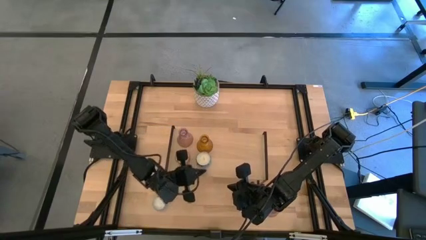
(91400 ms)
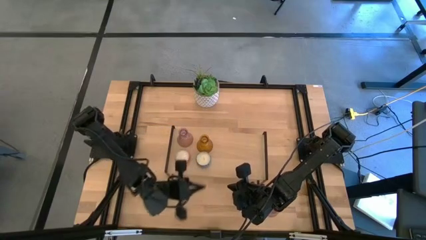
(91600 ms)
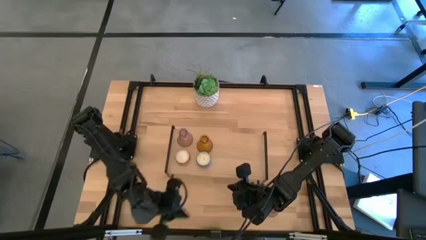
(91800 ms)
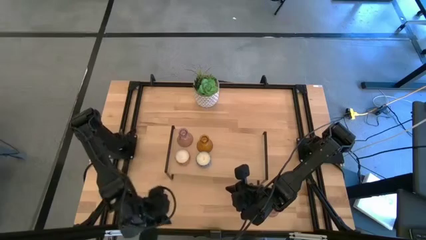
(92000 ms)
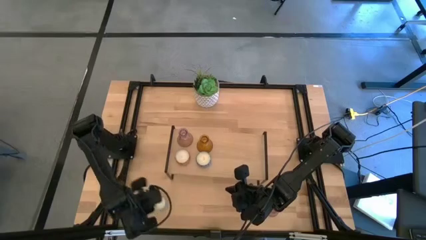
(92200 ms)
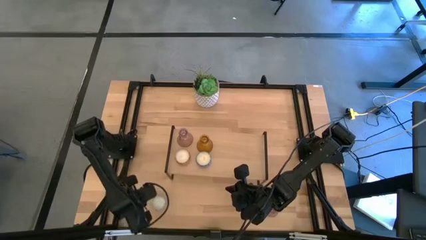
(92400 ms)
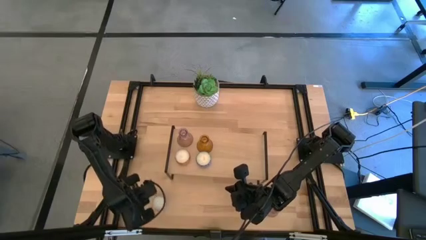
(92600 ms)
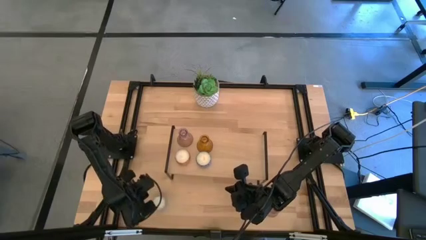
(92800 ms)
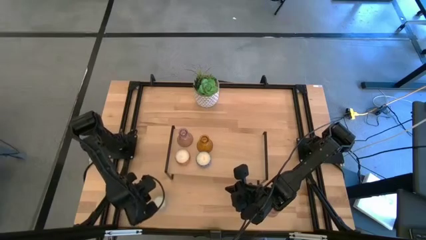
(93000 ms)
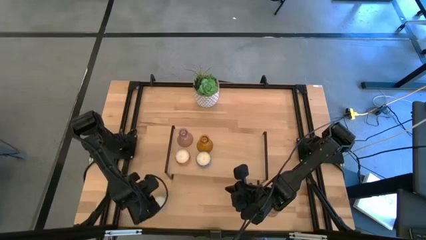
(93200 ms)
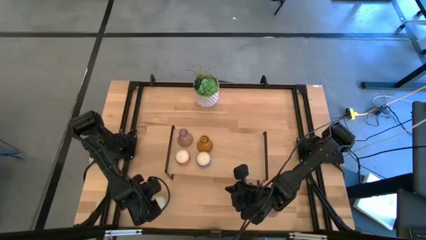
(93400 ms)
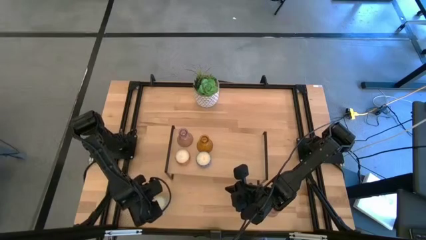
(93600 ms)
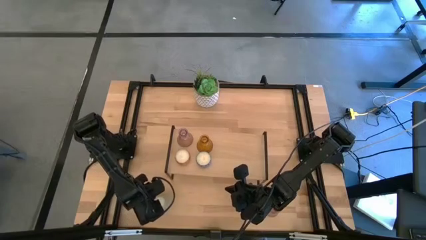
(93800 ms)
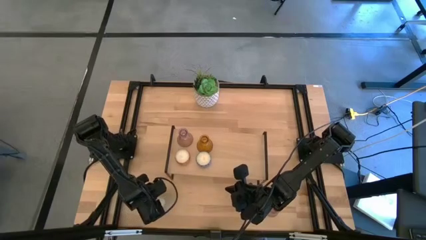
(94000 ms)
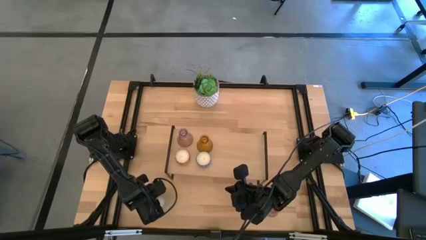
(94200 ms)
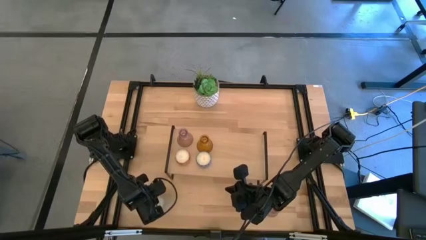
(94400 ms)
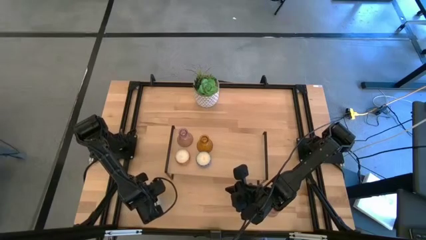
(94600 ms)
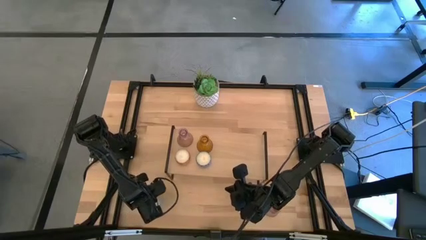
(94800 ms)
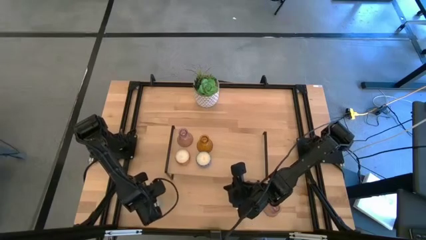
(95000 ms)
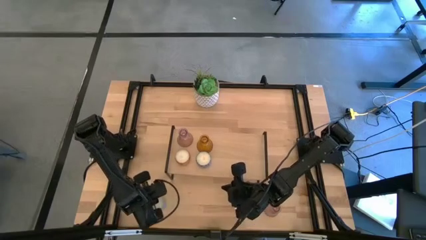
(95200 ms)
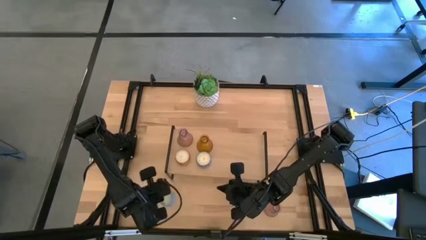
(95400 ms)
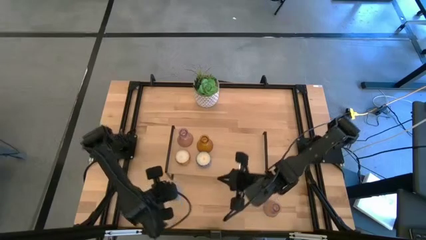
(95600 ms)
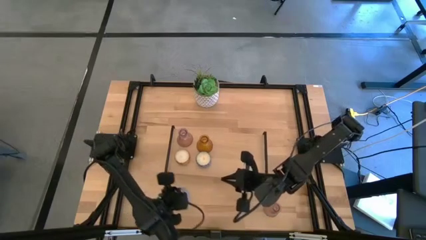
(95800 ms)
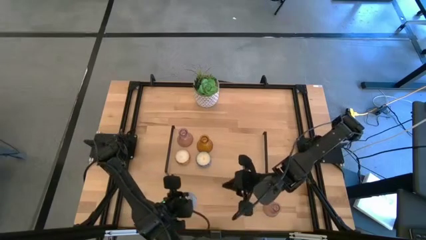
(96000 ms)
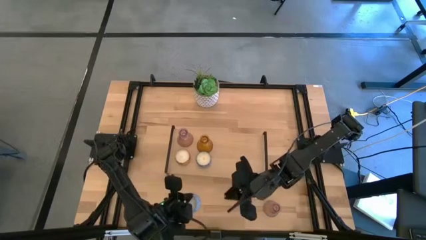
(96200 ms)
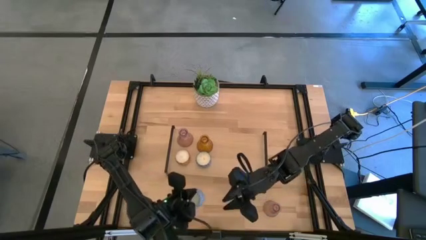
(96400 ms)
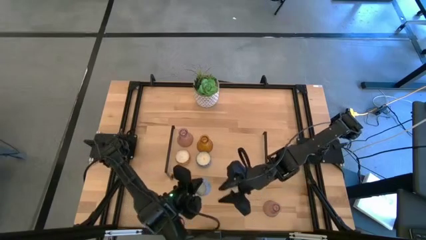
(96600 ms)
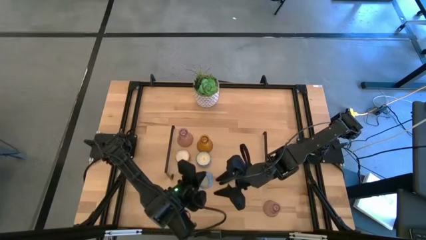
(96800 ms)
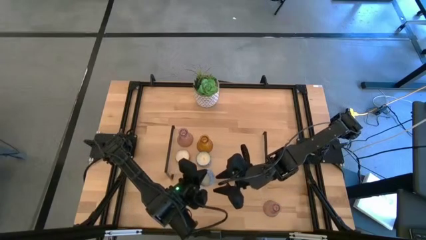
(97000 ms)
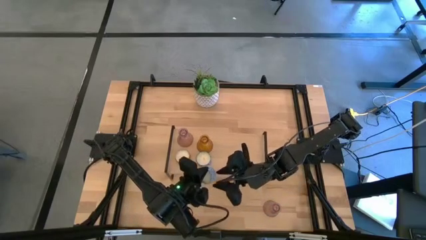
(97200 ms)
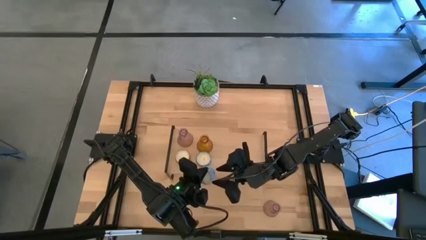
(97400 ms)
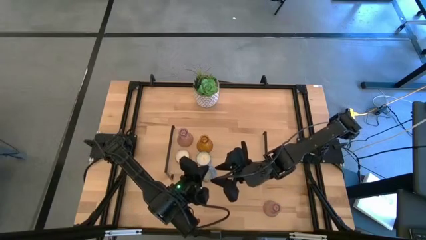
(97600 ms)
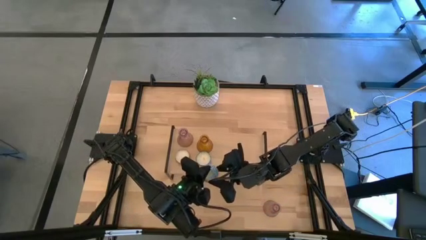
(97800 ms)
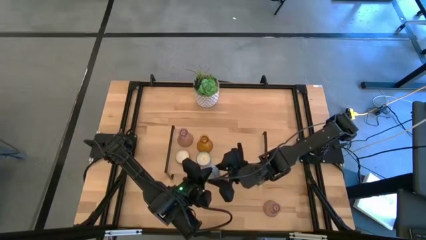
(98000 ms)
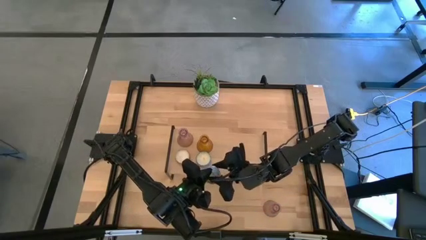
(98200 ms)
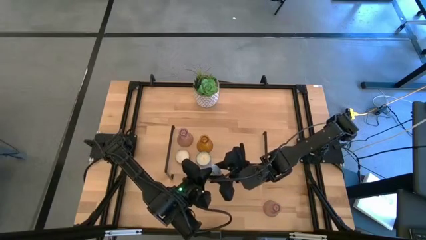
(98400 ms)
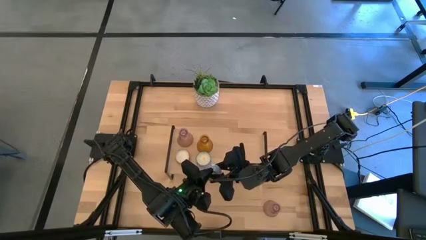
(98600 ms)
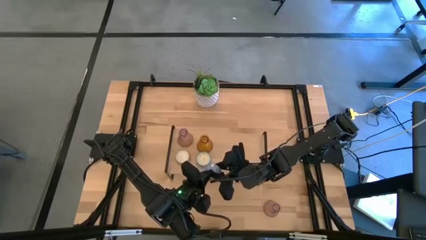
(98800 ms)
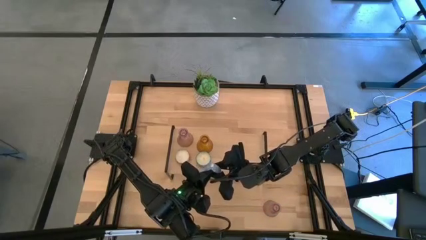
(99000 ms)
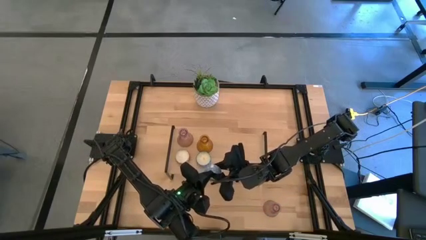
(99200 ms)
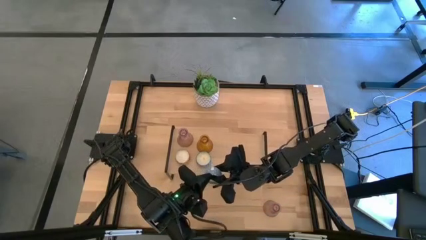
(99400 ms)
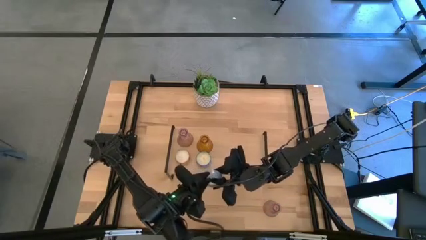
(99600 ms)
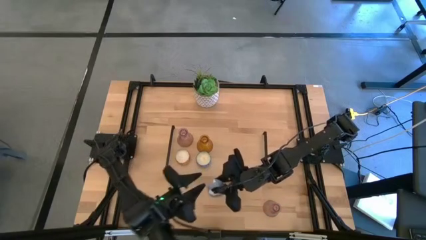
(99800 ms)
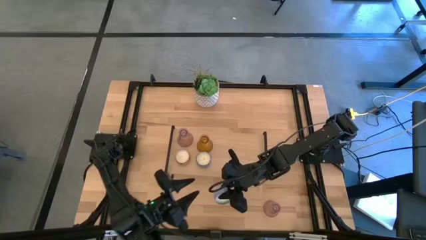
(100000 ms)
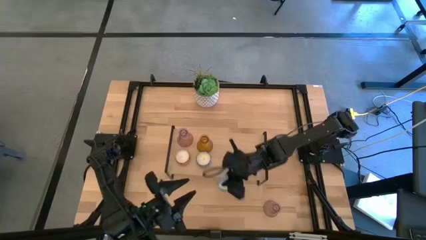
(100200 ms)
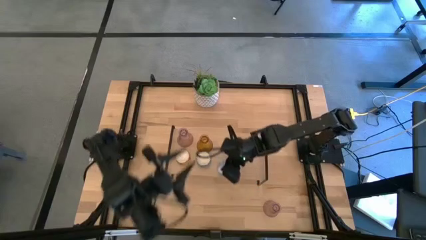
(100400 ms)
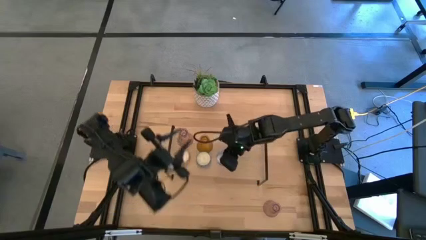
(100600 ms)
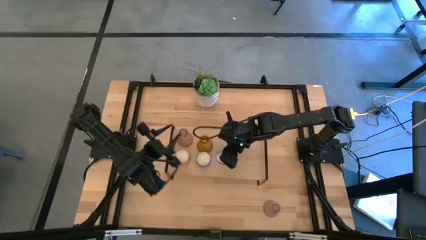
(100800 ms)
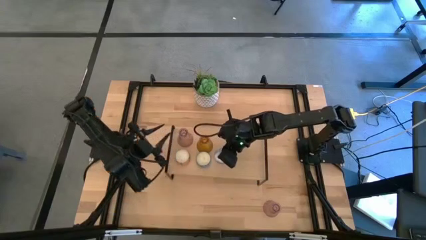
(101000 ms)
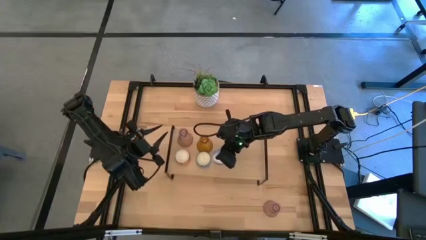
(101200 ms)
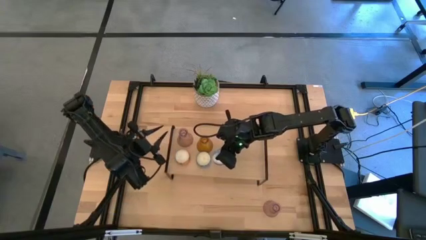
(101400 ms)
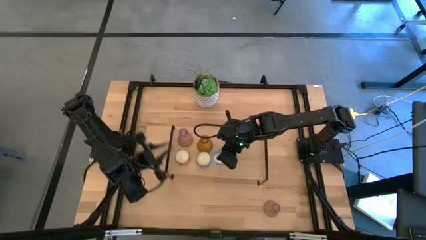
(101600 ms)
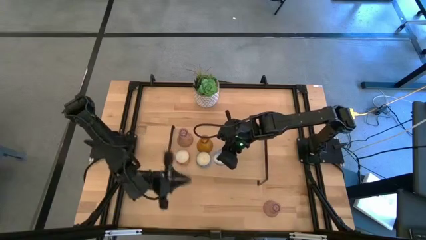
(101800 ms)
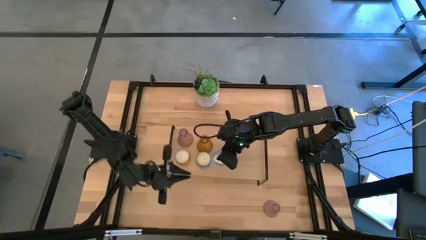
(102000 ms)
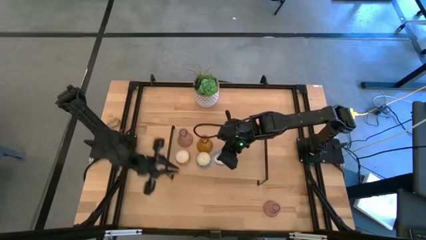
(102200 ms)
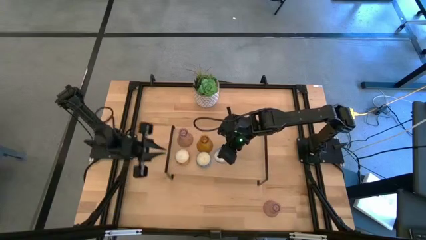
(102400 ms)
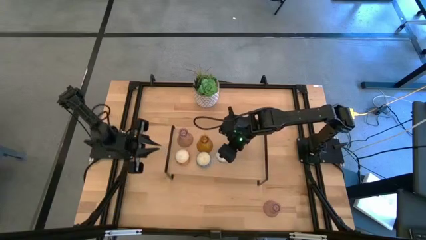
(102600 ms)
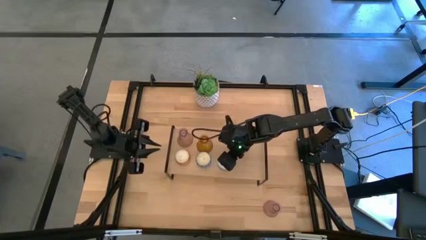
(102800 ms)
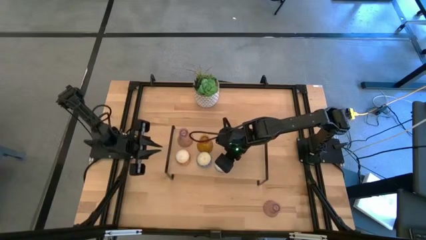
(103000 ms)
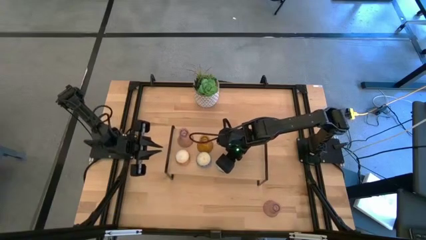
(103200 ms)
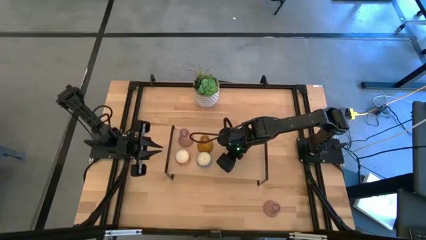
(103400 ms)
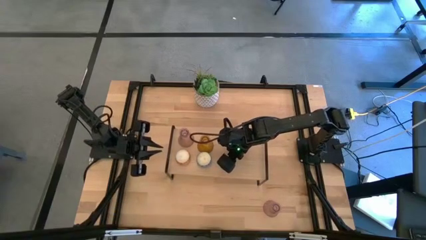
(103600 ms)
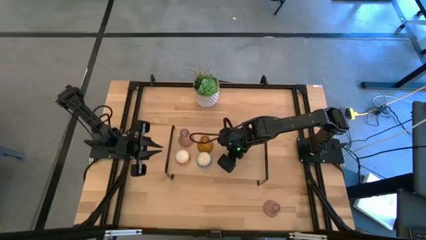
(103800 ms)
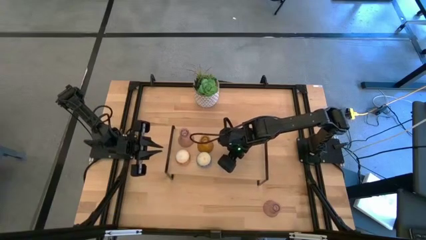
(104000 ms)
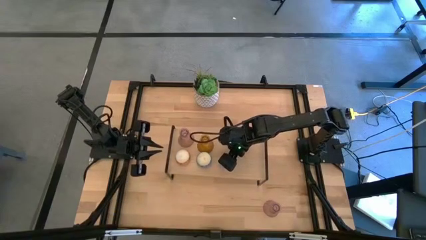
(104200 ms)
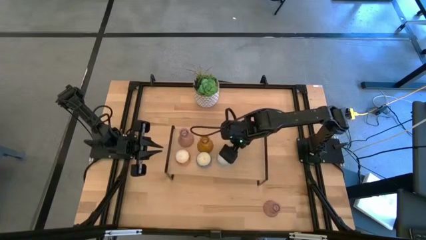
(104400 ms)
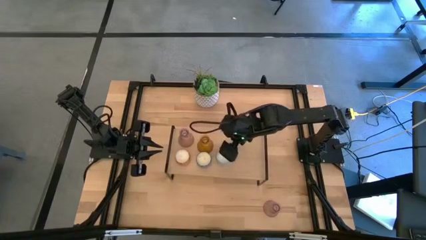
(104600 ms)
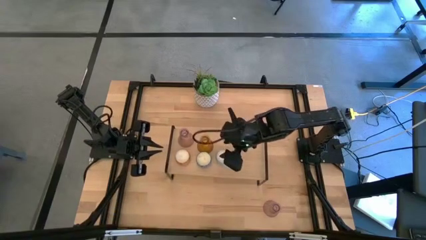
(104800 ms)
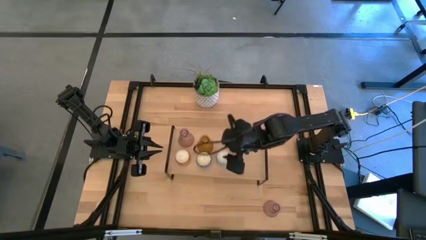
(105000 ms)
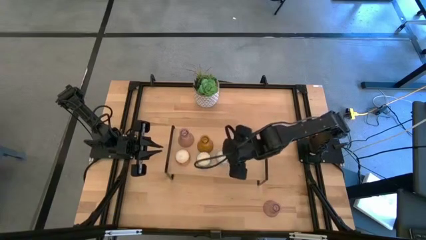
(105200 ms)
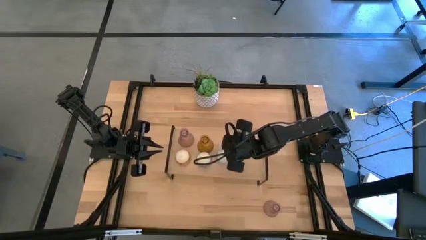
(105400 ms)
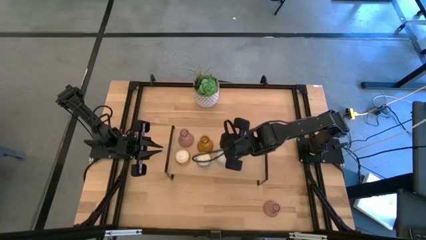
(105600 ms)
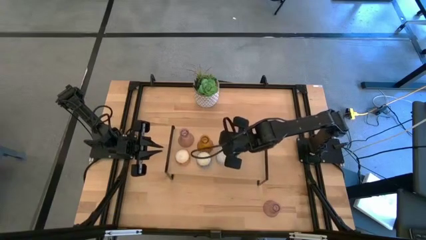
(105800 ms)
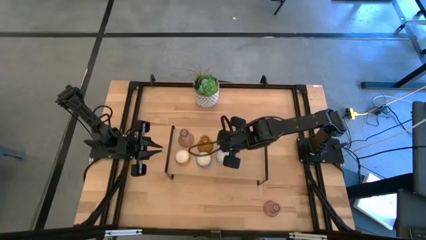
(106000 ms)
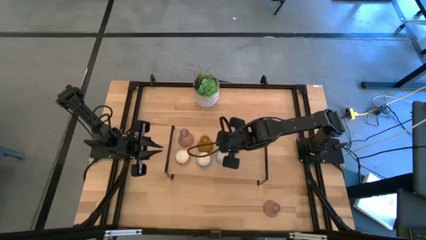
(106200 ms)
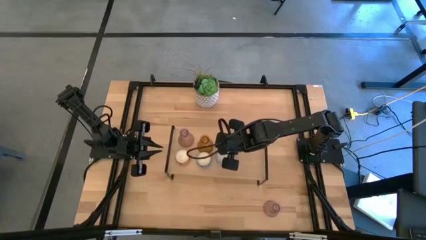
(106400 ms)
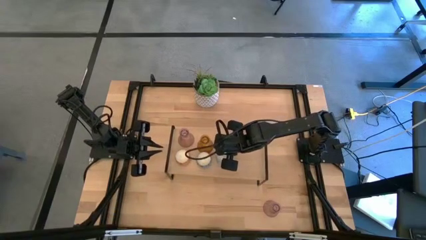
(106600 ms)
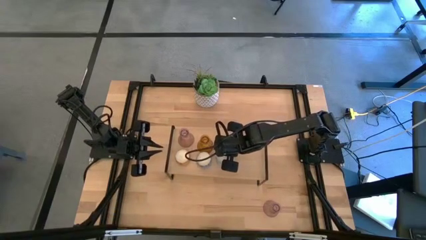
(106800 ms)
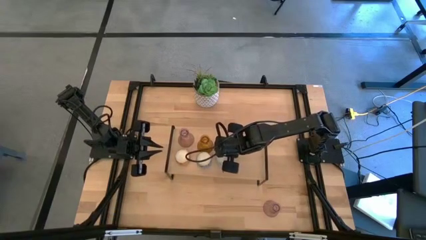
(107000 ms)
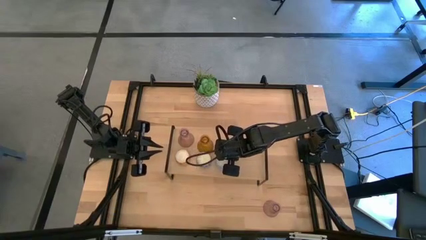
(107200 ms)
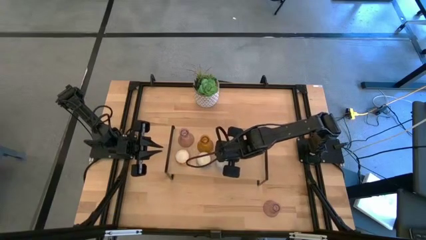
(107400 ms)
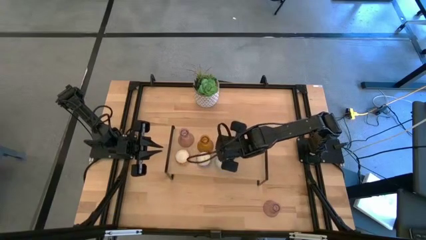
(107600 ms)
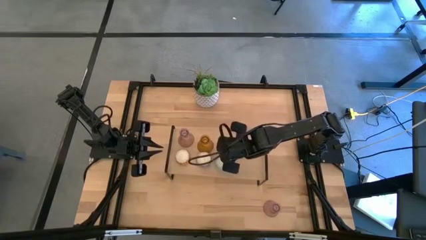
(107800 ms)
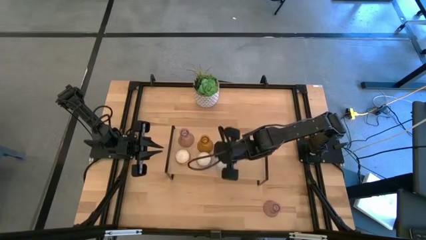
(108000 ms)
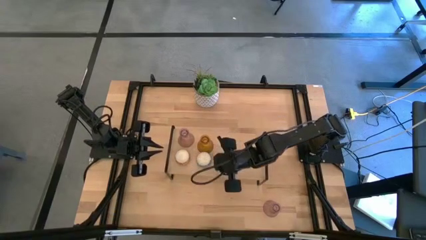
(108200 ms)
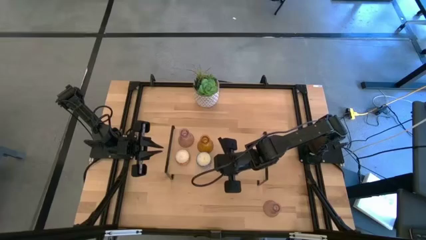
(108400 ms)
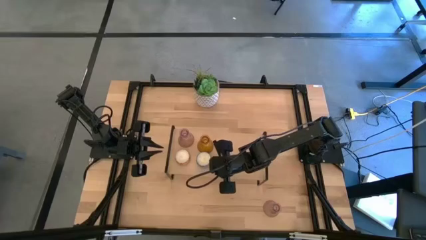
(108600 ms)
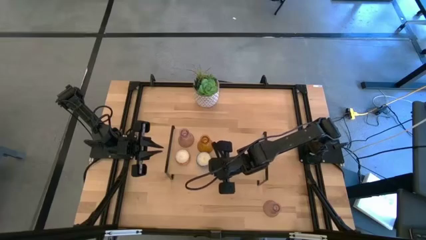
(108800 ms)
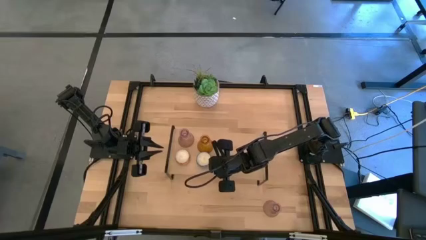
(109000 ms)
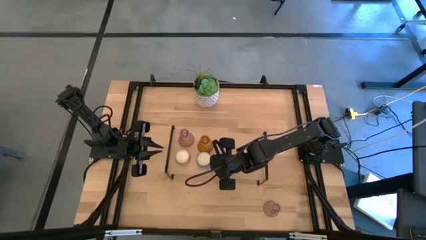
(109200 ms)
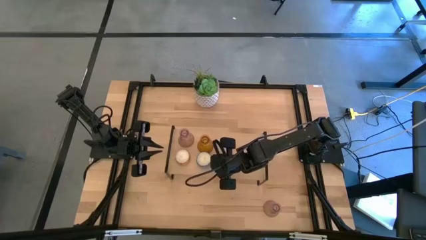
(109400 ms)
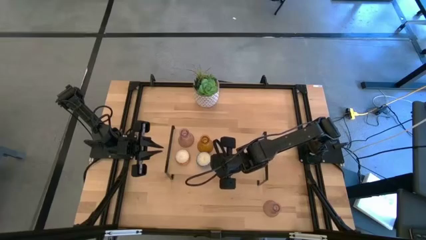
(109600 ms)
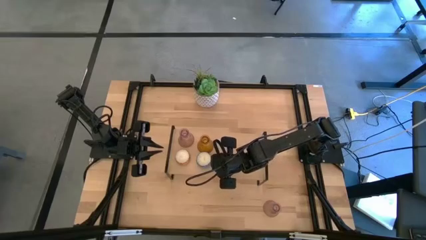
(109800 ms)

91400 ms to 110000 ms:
Task: Pick & Place candle stick holders
Put the blue scented candle on the shelf
